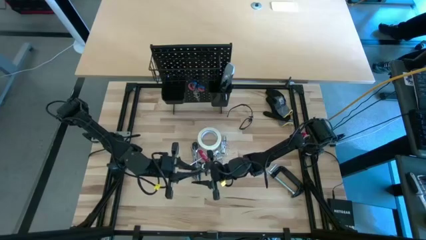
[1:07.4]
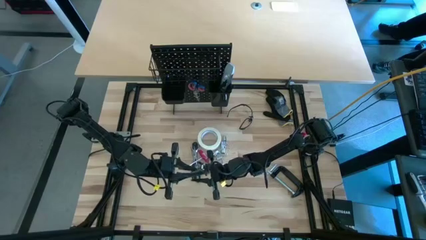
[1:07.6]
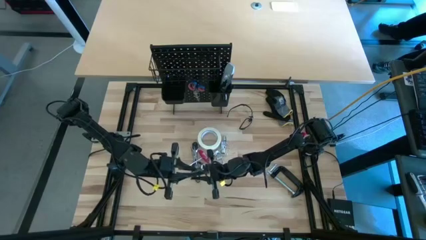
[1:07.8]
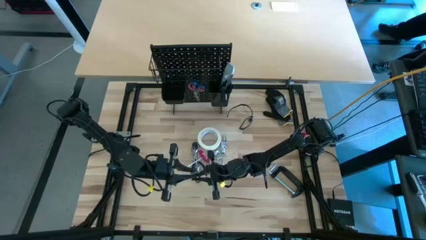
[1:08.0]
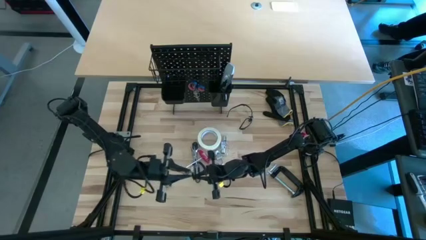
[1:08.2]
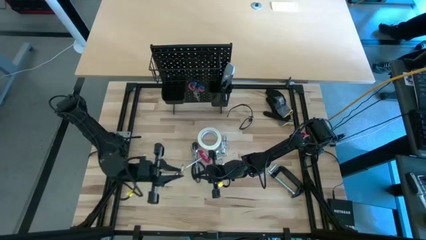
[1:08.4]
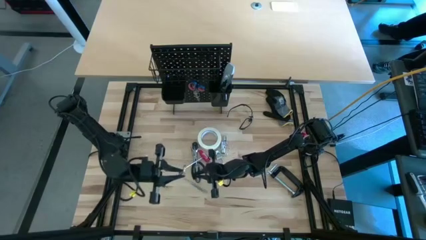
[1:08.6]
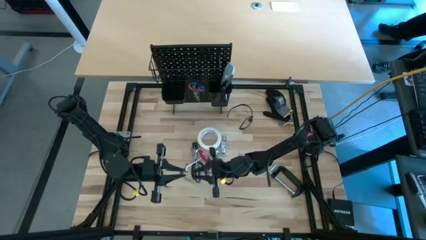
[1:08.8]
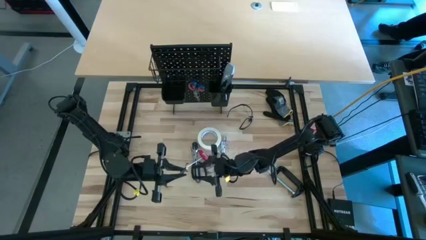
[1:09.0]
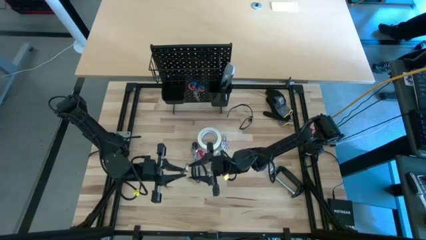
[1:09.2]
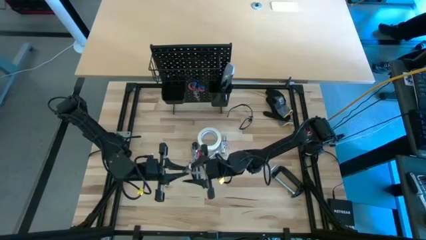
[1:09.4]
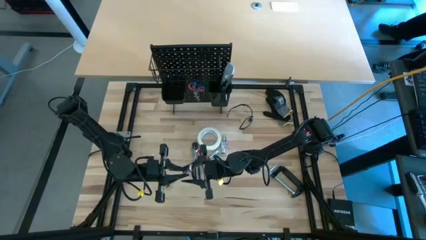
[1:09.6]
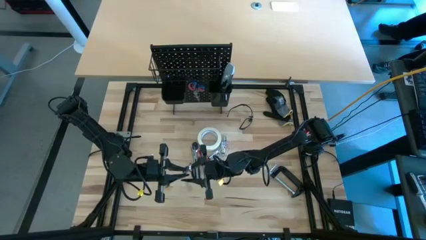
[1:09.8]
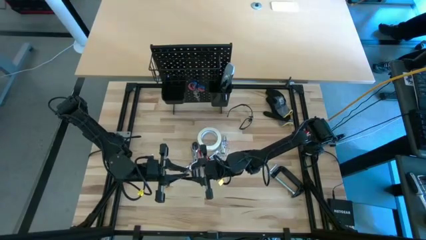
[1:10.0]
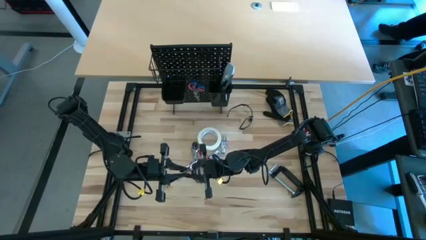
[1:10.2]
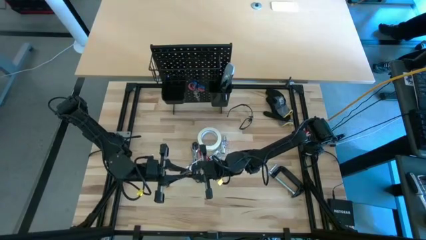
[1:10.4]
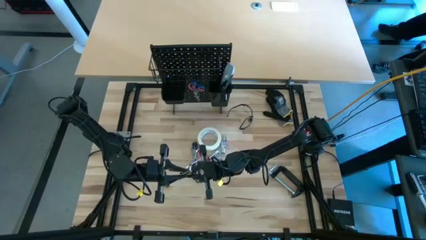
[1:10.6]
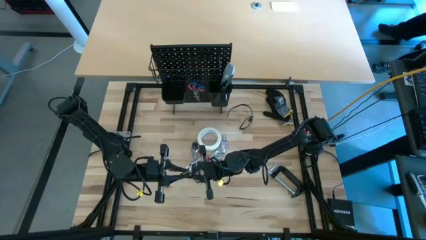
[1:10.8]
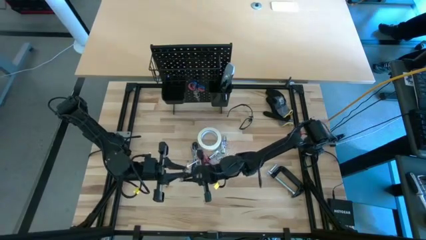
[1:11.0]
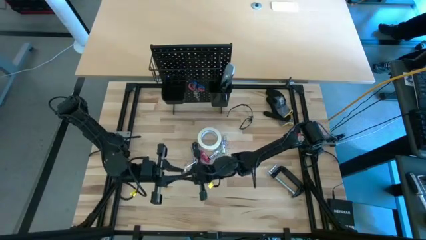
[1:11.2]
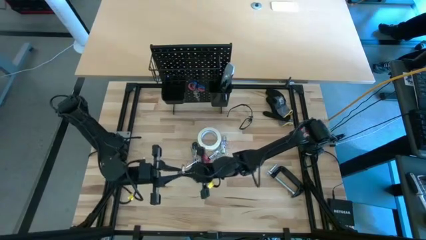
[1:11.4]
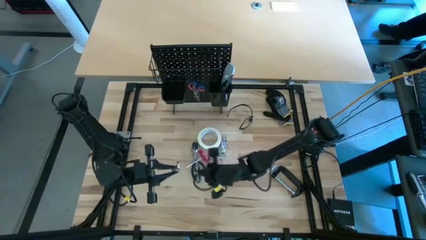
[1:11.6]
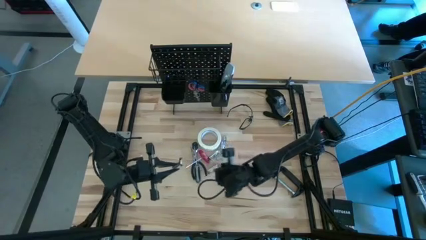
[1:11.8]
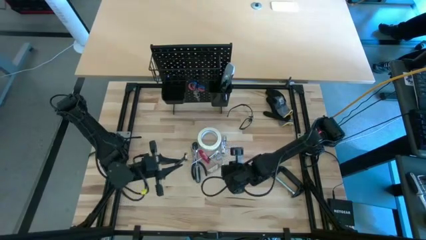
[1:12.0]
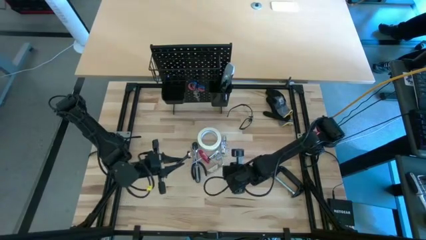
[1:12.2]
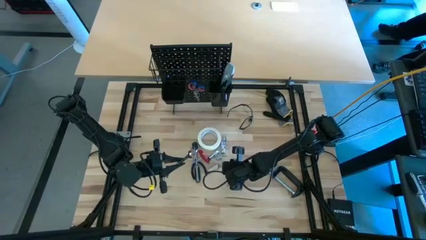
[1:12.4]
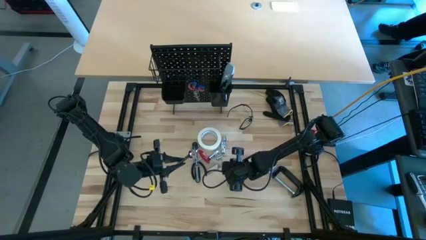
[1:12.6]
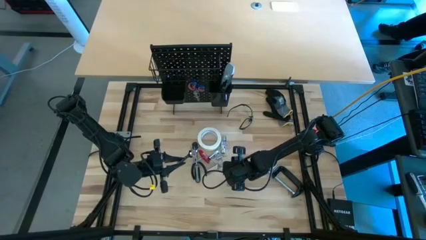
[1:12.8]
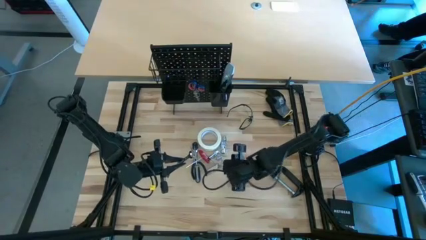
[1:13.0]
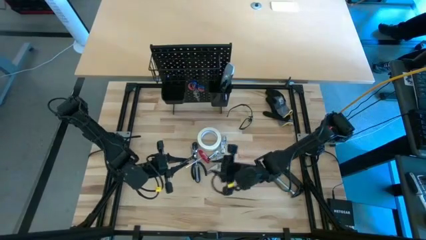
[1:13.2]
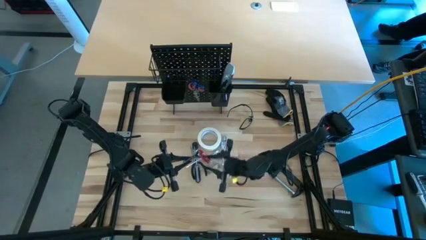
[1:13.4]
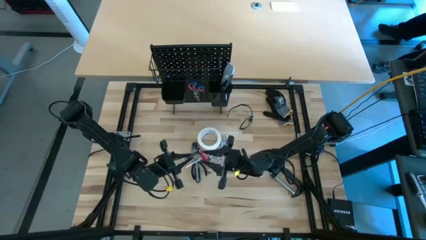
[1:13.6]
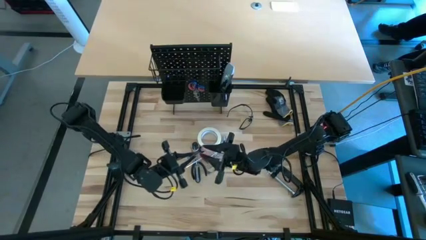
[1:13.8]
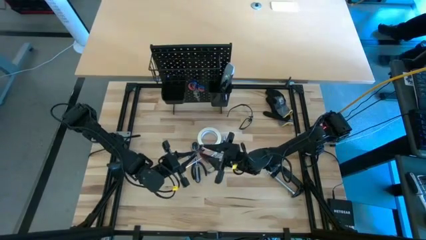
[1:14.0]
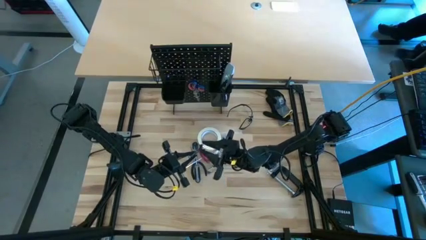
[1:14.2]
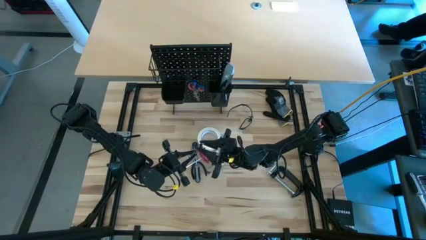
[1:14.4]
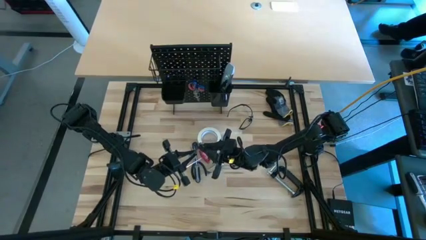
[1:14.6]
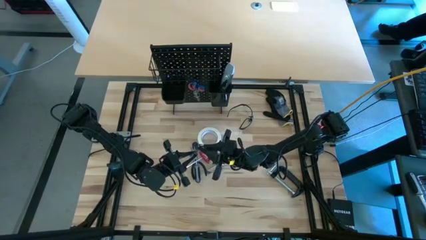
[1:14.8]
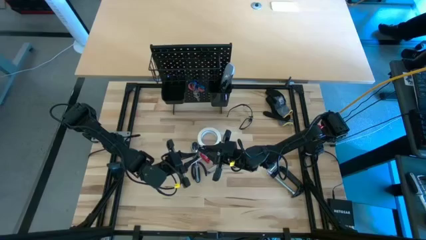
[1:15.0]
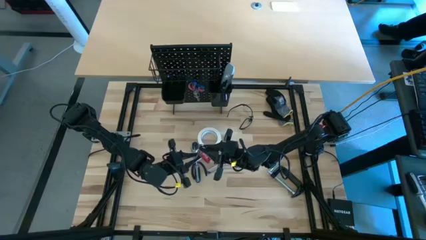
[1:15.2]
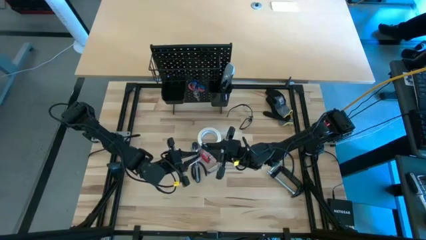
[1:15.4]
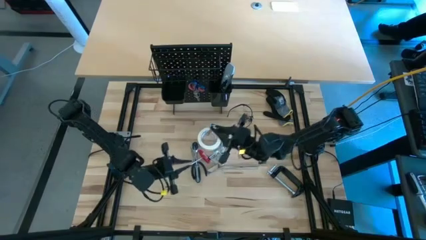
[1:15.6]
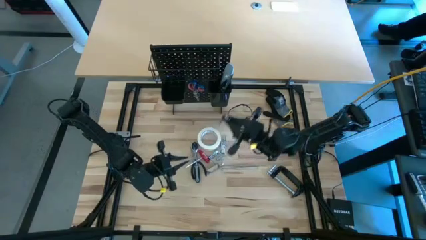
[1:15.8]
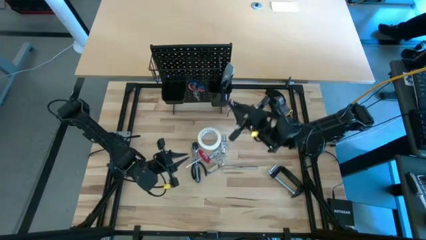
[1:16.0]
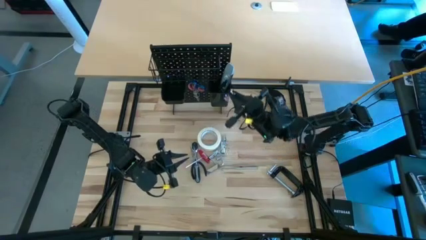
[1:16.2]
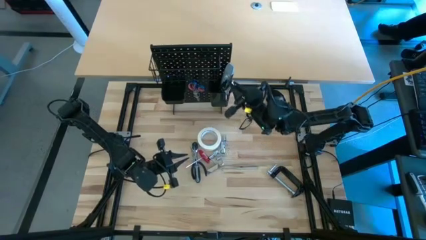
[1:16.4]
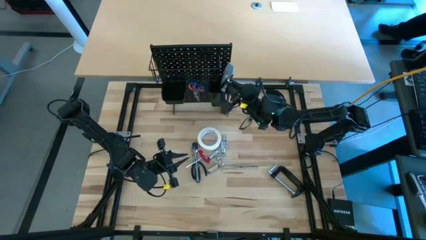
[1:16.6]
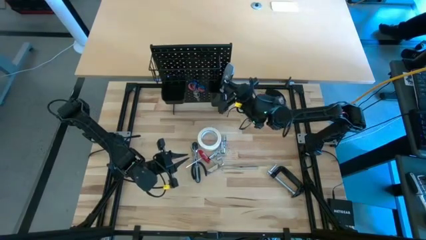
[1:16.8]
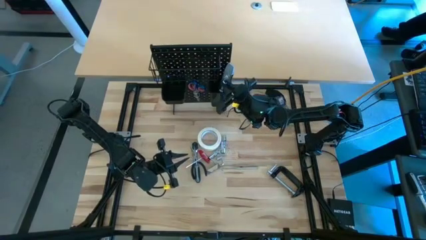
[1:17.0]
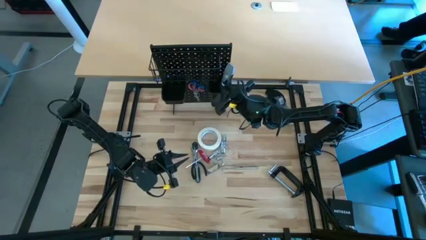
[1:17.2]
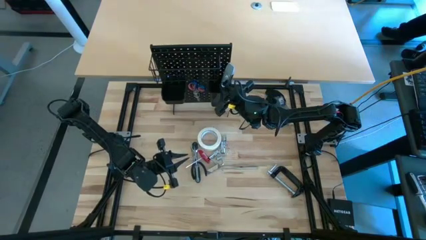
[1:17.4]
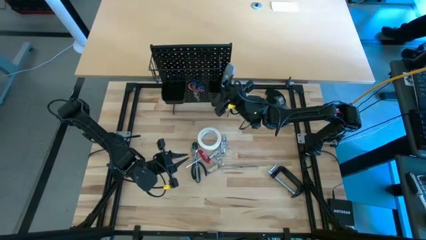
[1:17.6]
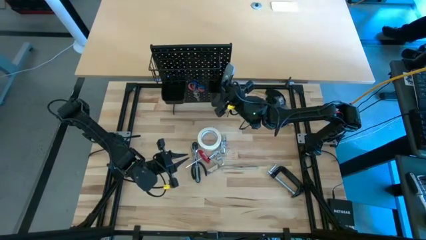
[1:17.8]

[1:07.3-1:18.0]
Task: Hang tools onto peg board
Put the silver wrench into the right black bin on the peg board

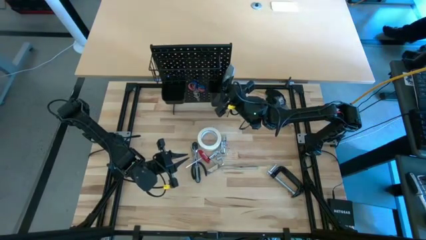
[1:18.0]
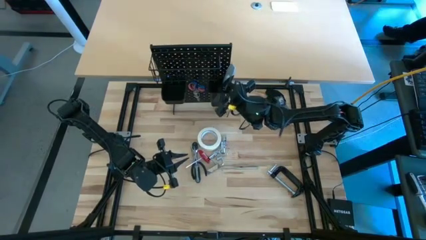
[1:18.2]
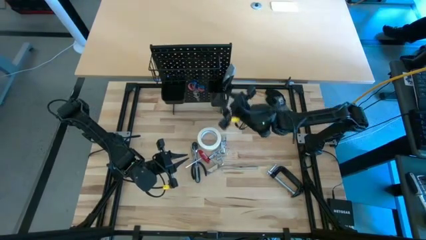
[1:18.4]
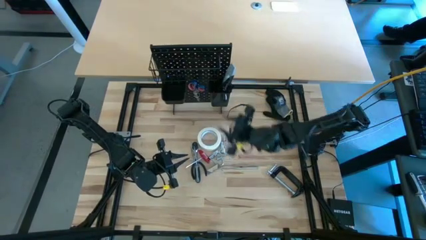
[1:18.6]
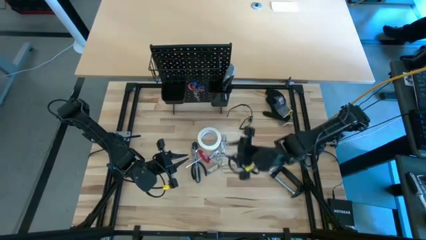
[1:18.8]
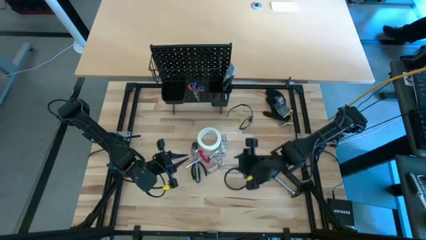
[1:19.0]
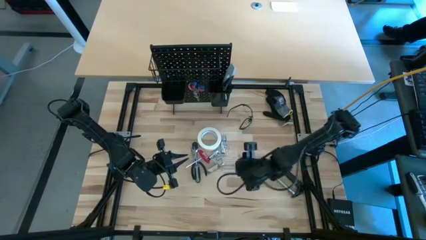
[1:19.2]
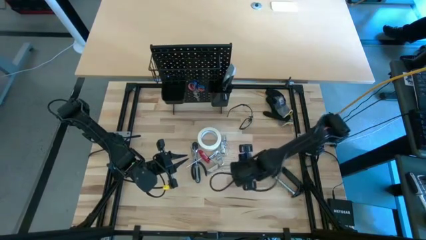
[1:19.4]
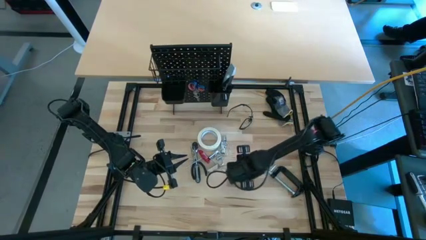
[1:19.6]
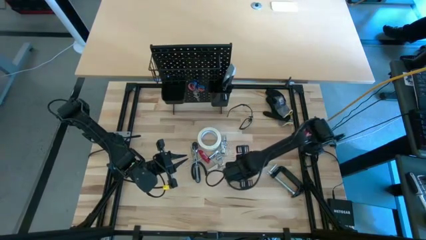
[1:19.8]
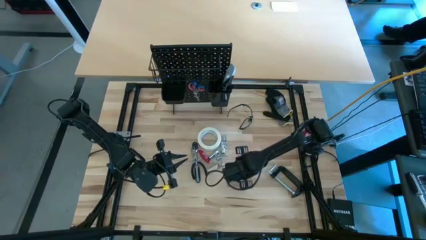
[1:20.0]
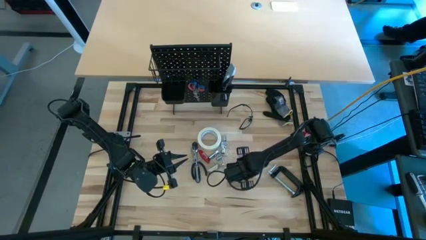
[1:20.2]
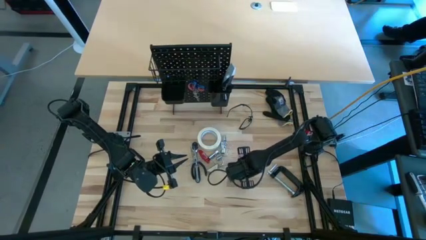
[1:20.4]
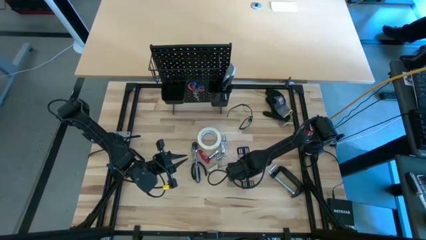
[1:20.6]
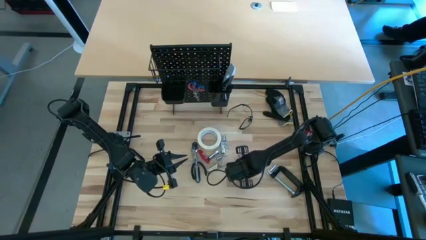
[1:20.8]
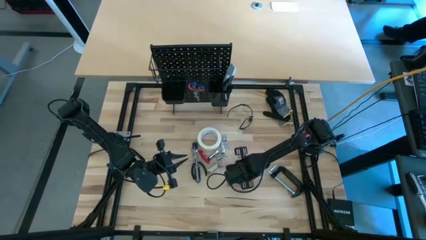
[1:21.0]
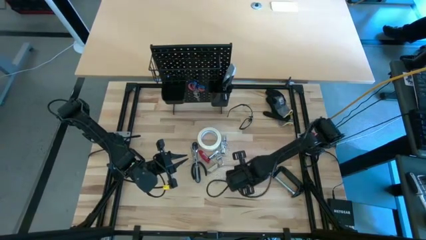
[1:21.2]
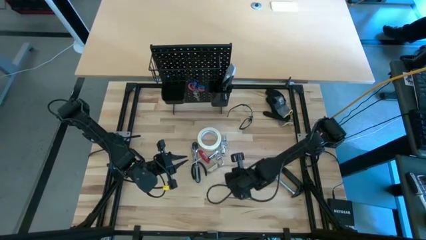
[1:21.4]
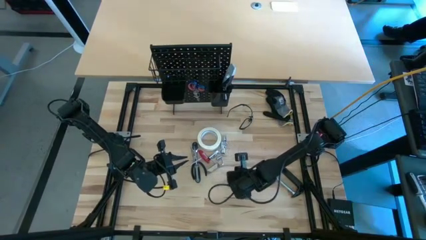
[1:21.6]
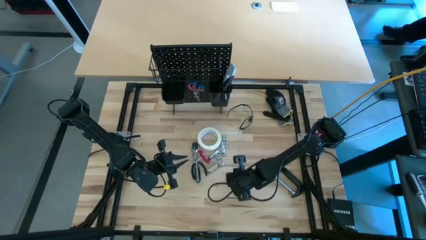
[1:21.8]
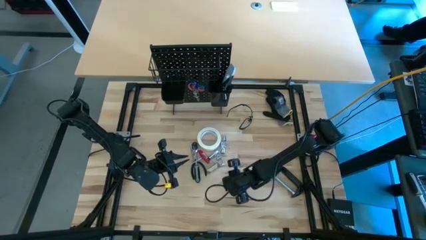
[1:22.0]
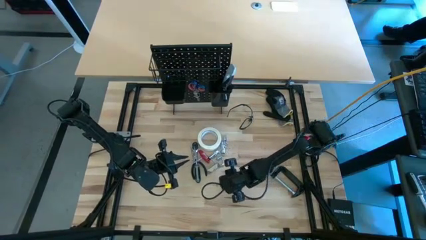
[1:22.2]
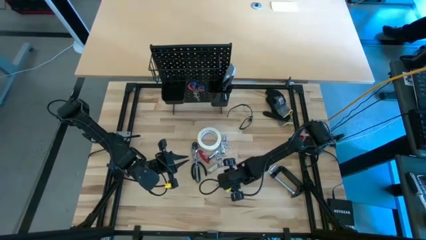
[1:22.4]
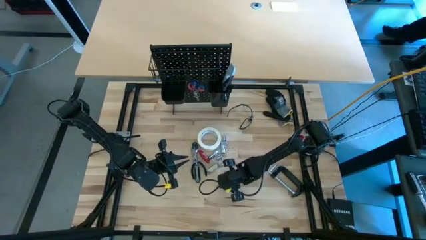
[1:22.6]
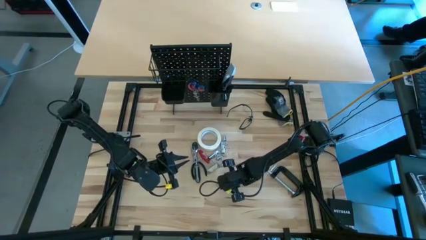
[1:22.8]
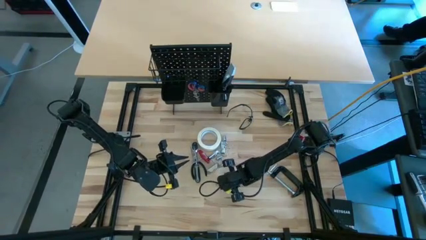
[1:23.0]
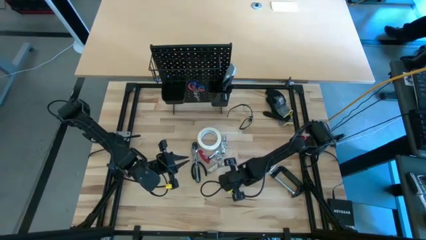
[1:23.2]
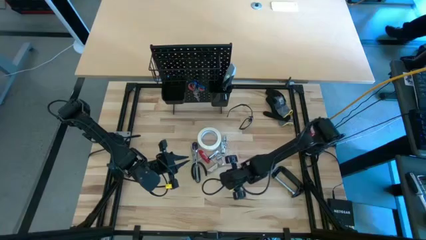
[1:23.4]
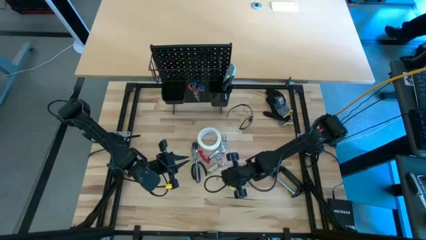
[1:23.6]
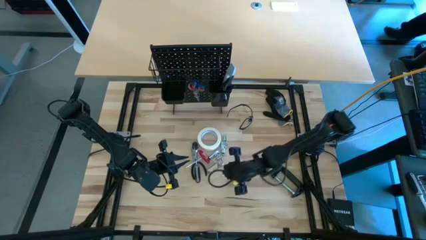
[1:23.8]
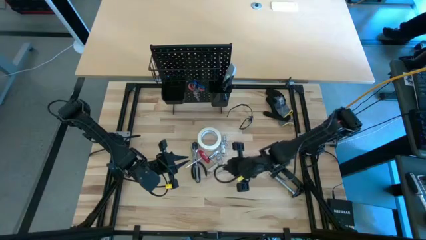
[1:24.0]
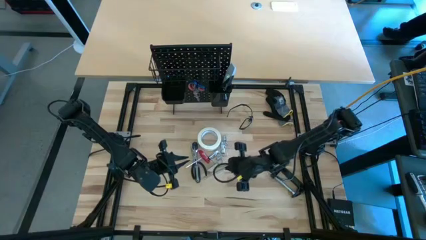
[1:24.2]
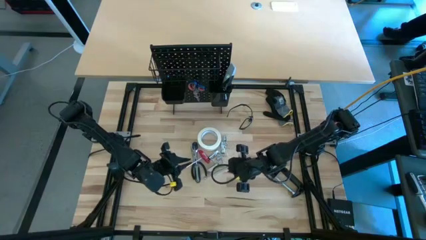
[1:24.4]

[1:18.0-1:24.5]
Put the silver magnetic telescoping into the right black bin on the peg board
